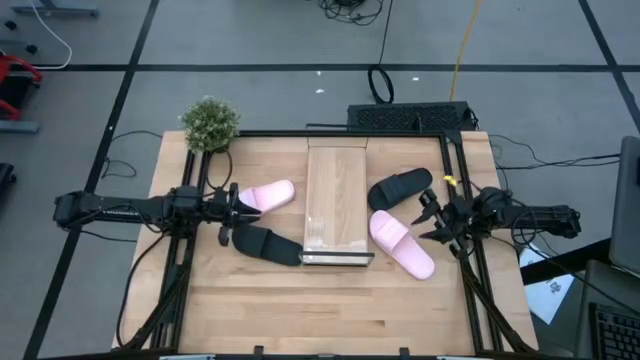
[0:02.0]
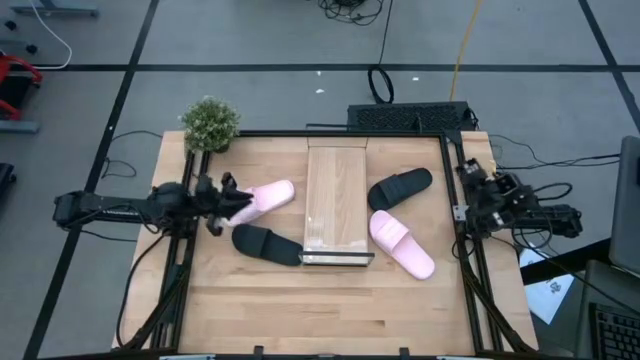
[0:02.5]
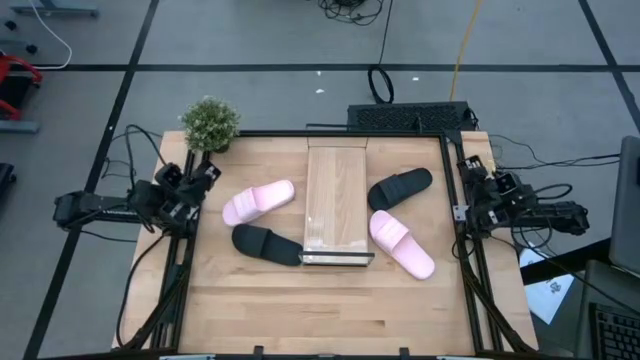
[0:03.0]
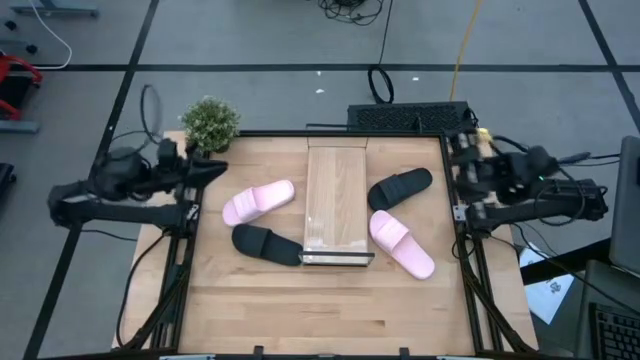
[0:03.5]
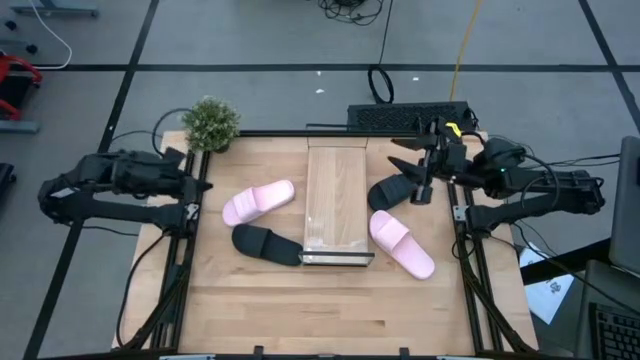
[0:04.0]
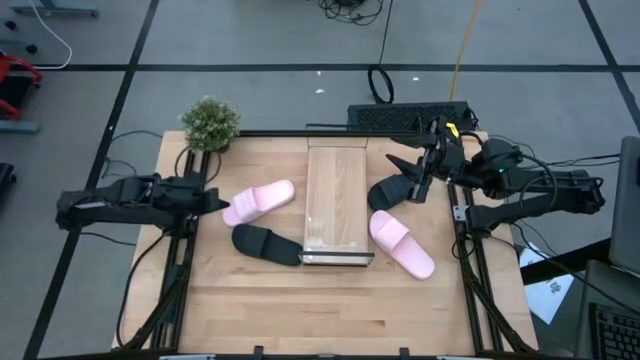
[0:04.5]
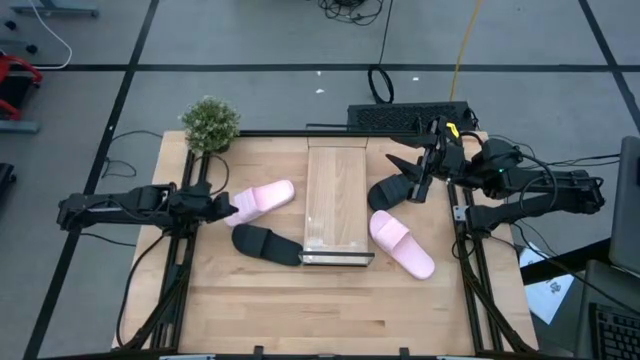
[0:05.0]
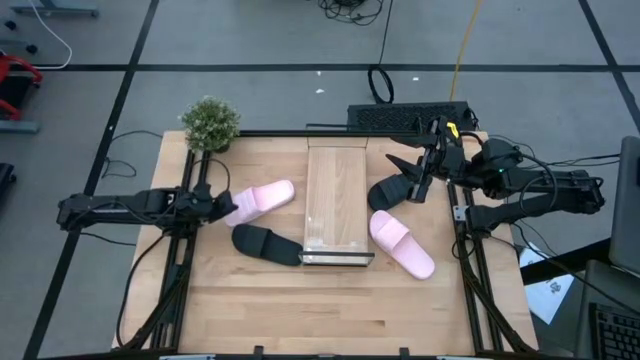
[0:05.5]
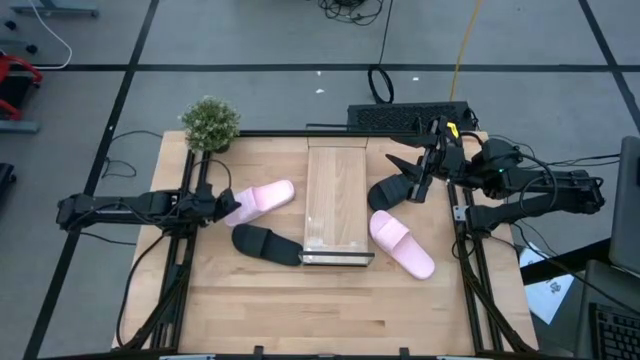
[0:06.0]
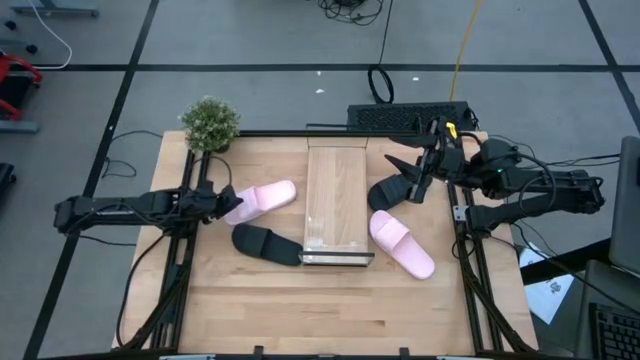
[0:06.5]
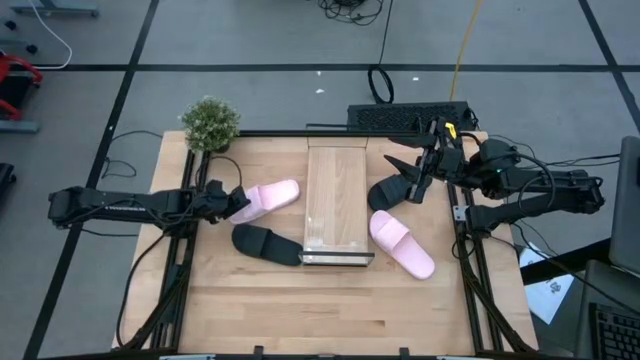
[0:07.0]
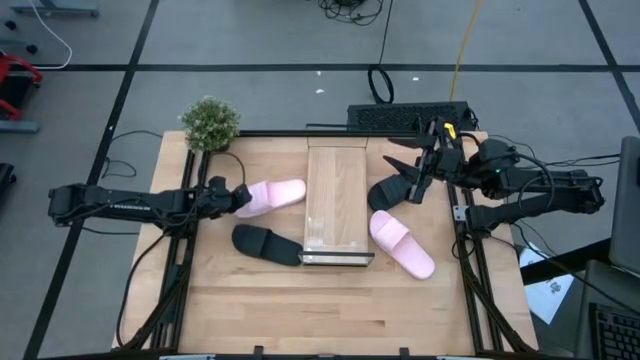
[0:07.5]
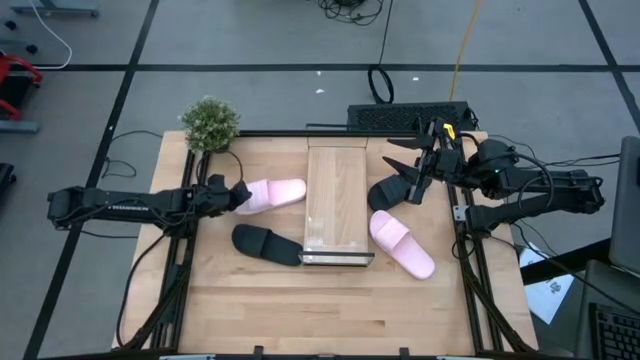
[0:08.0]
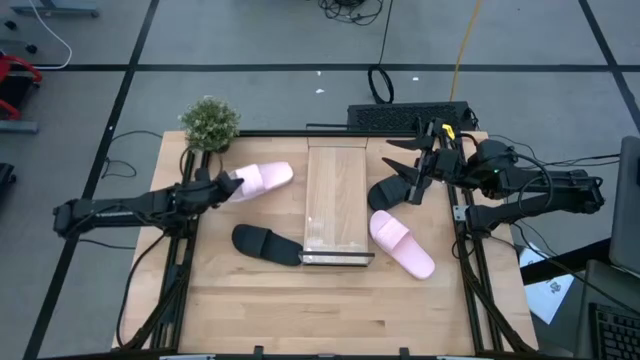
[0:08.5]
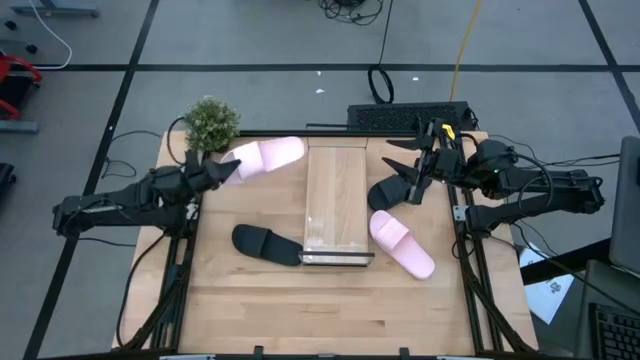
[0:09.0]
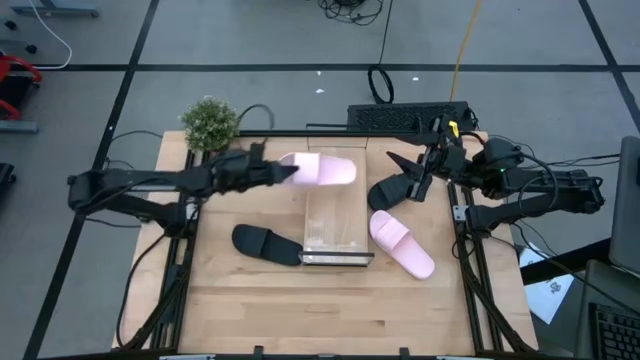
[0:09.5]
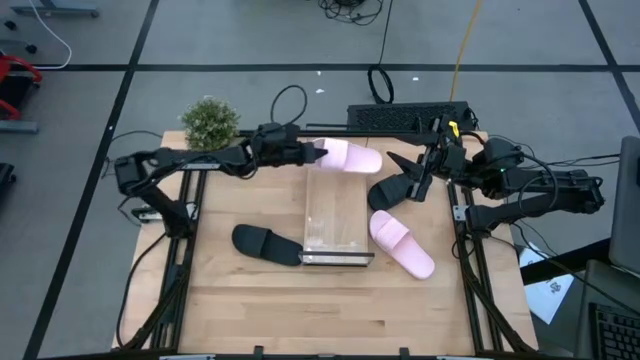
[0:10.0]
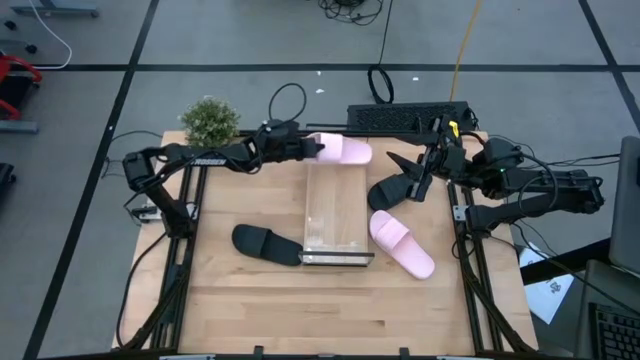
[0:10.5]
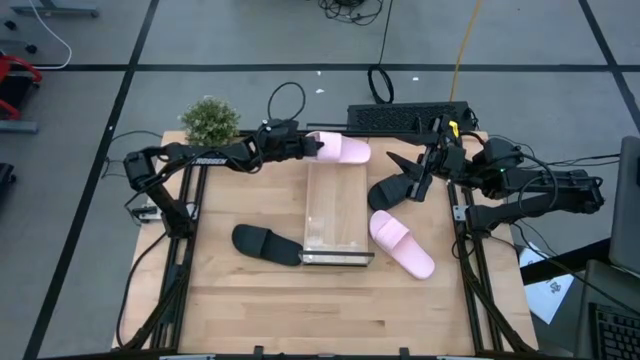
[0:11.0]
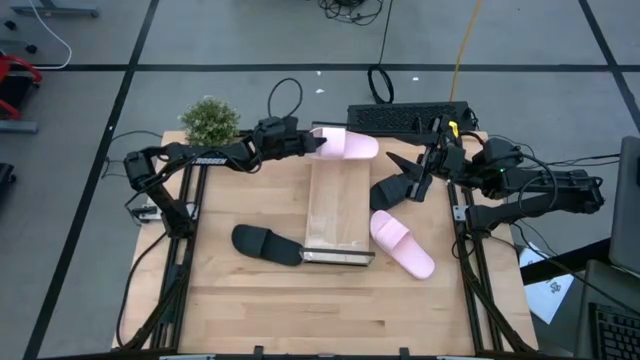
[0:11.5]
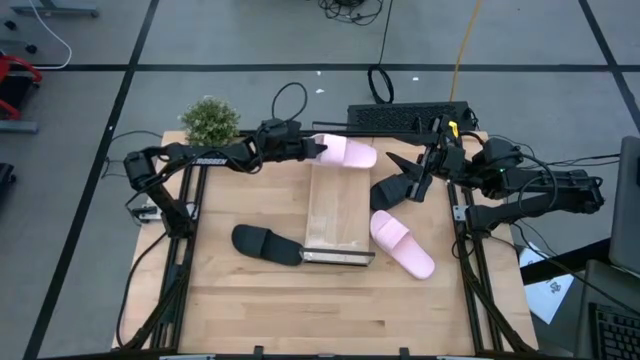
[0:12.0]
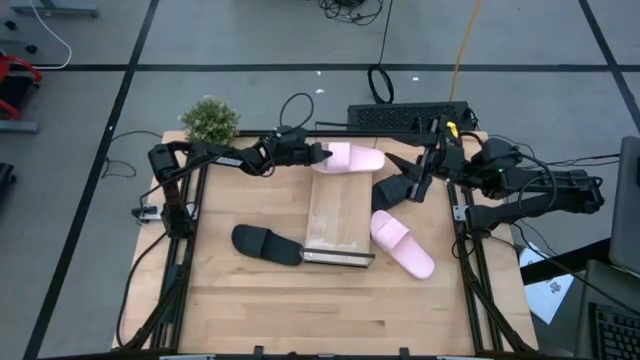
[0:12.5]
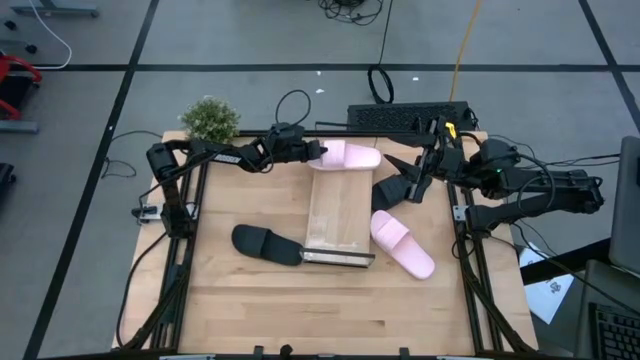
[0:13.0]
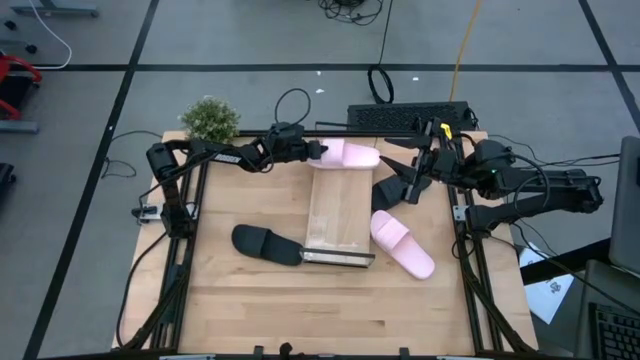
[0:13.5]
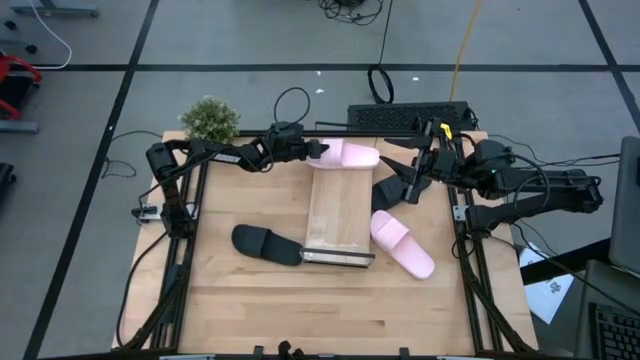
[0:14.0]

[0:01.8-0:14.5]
Task: Pick and place slides into the shelf
Put the left pink slipper on the shelf

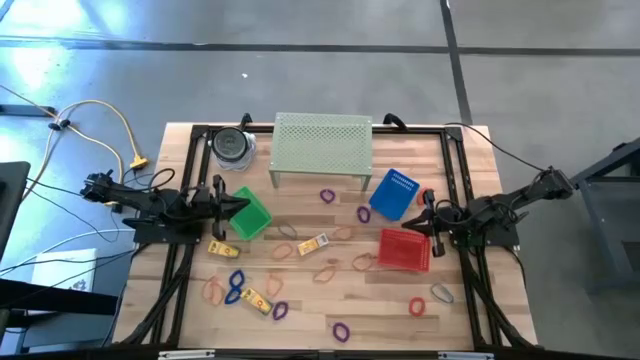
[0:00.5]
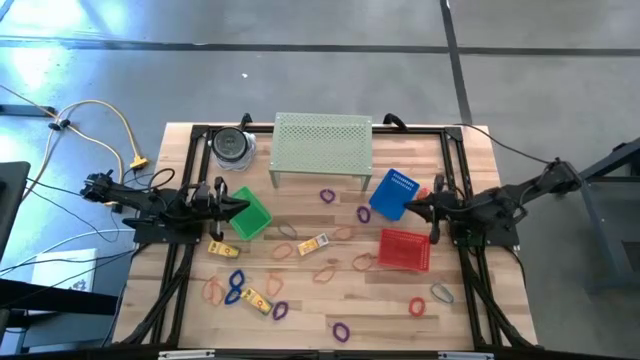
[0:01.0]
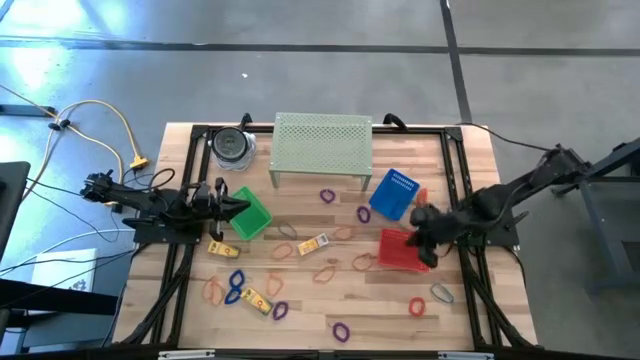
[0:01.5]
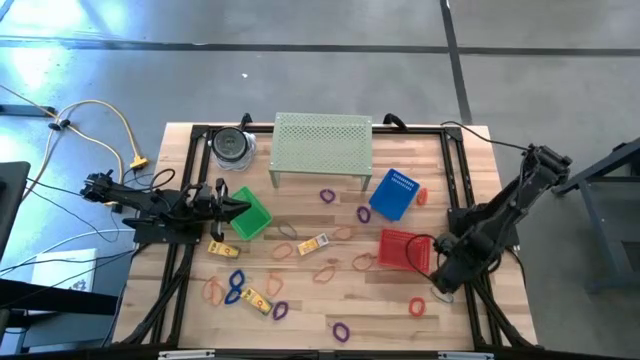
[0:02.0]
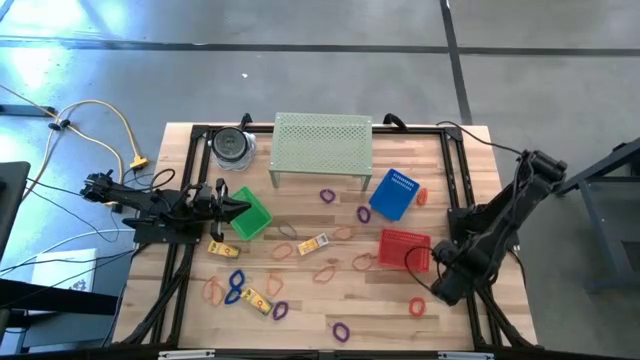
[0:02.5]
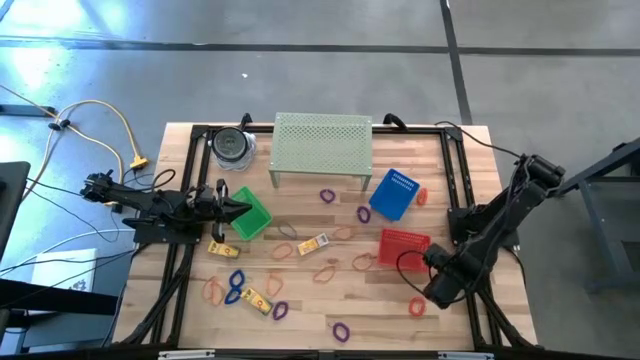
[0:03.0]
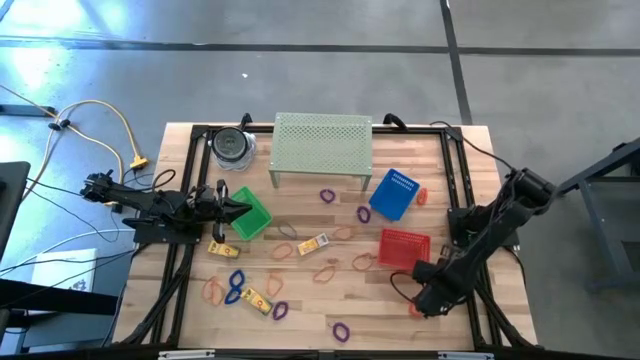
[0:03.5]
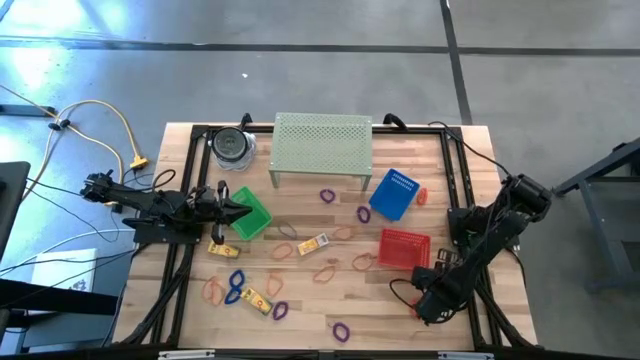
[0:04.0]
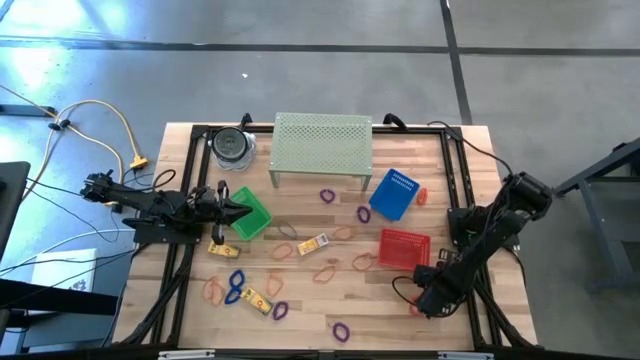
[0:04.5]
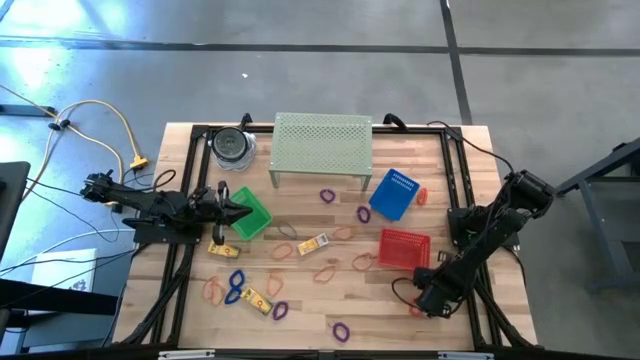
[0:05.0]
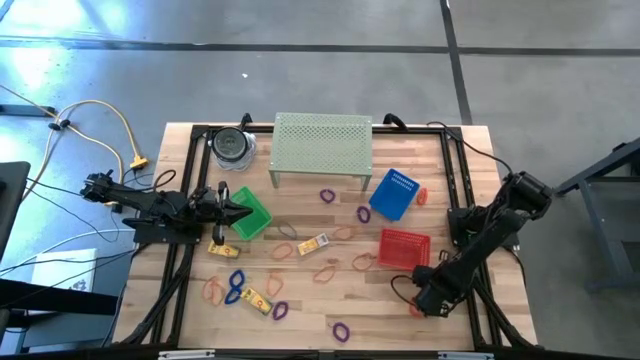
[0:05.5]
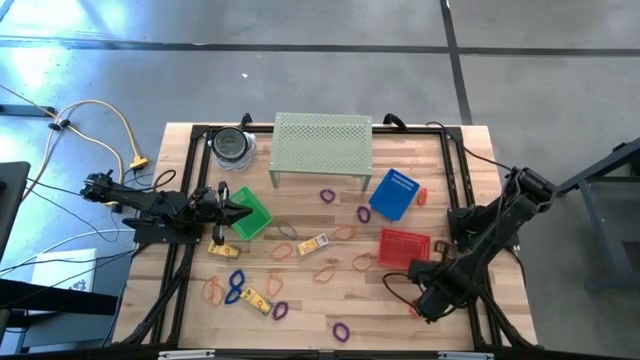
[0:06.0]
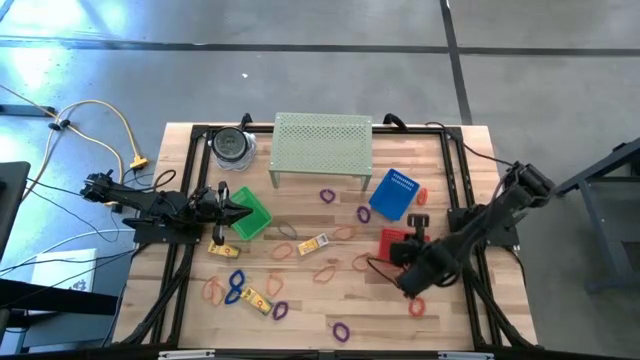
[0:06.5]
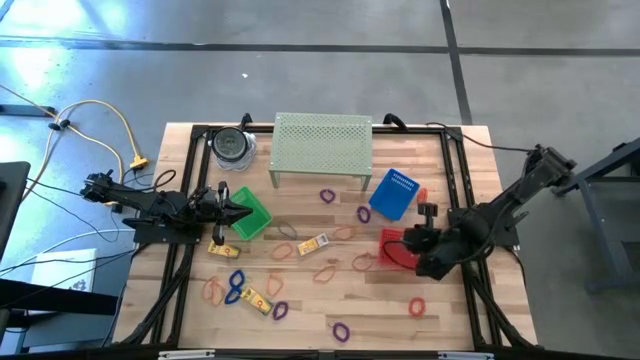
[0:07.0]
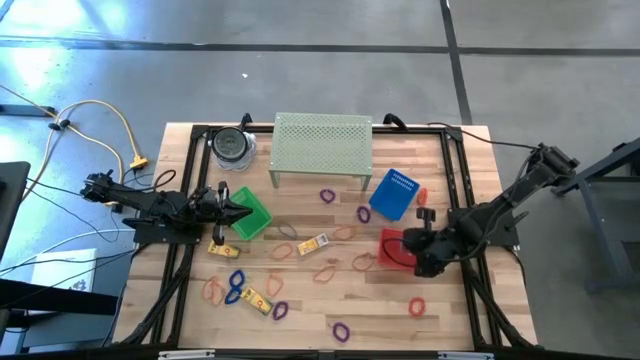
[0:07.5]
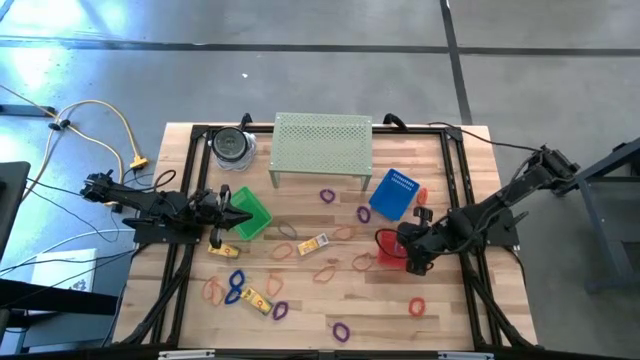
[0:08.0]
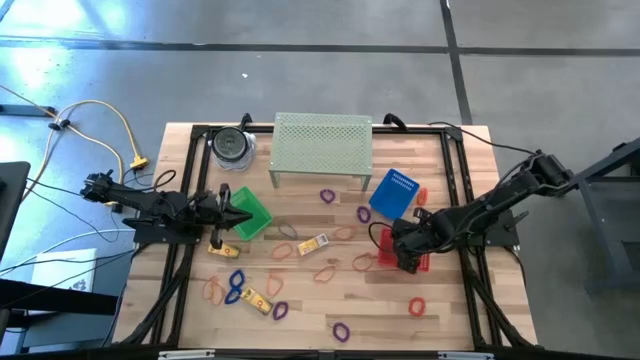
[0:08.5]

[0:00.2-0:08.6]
Task: Pick & Place Office Desk Supplies
Put the blue rubberband into the red basket
